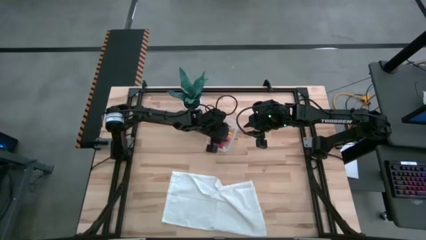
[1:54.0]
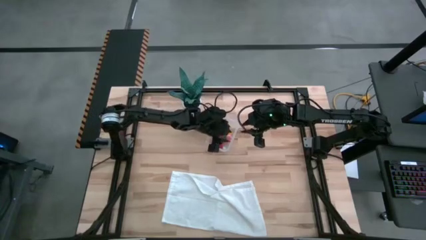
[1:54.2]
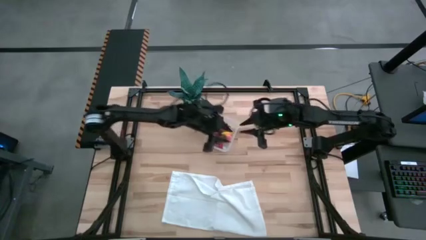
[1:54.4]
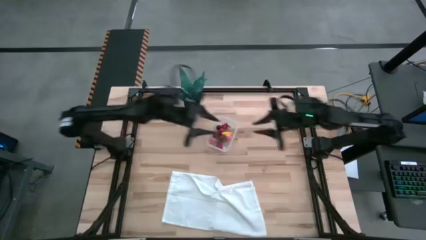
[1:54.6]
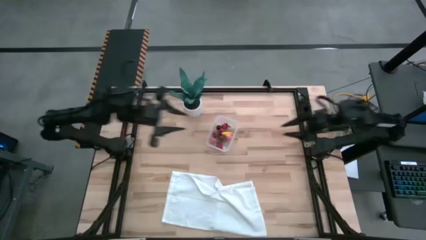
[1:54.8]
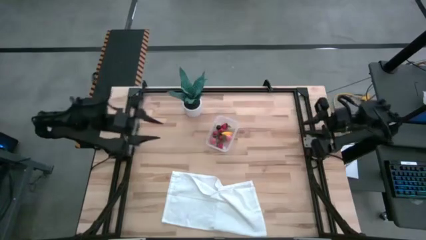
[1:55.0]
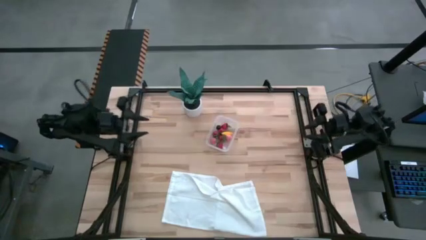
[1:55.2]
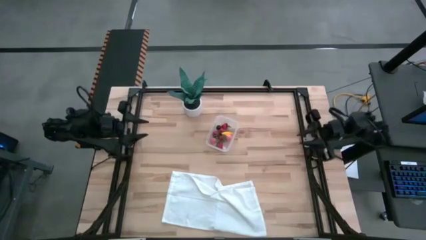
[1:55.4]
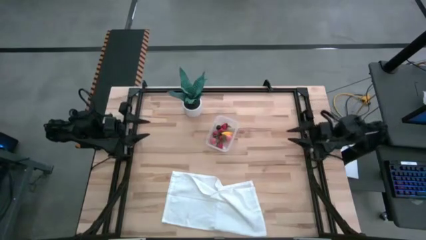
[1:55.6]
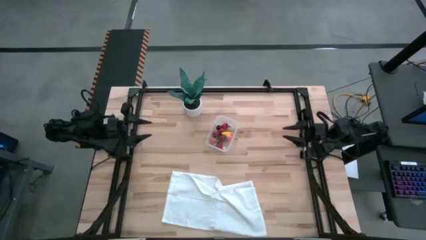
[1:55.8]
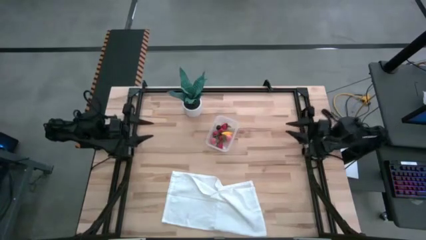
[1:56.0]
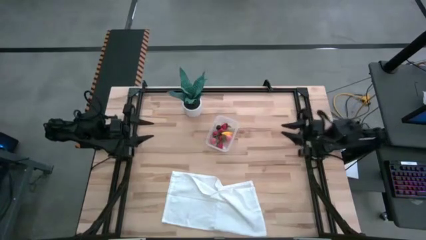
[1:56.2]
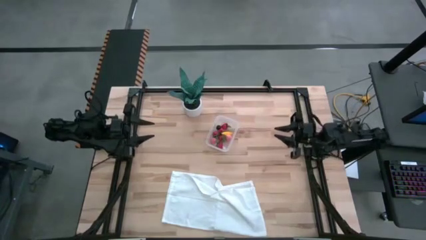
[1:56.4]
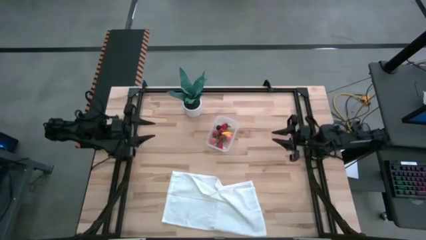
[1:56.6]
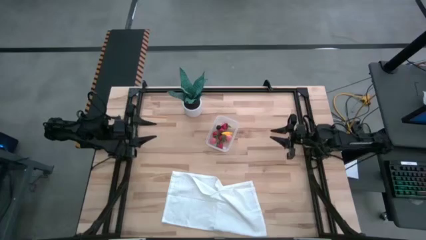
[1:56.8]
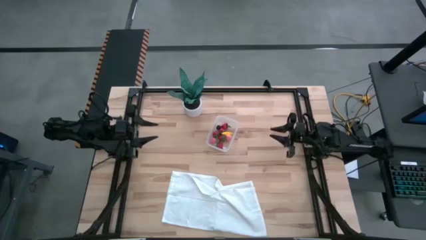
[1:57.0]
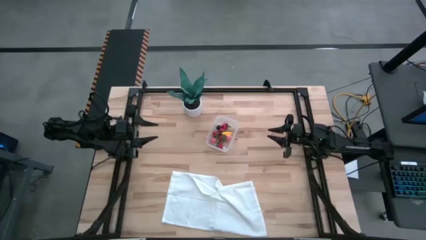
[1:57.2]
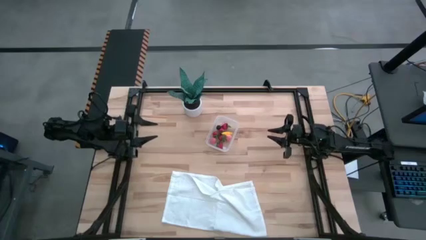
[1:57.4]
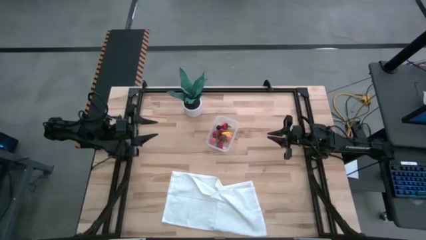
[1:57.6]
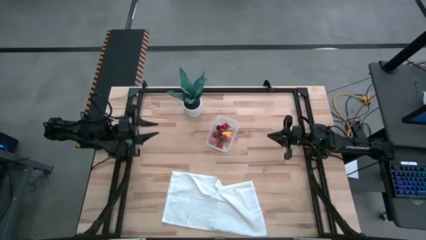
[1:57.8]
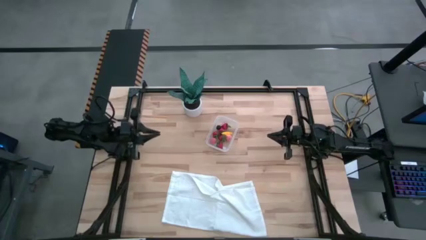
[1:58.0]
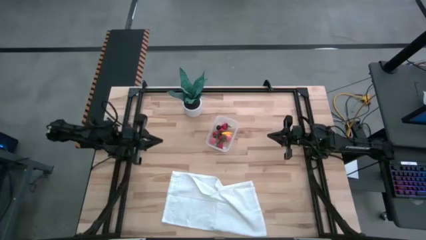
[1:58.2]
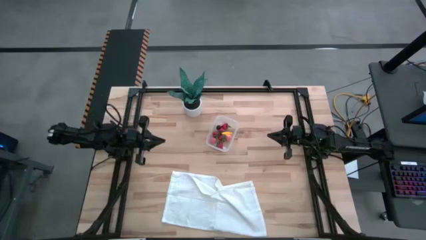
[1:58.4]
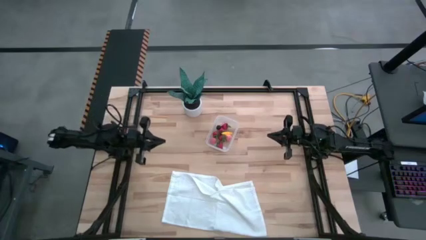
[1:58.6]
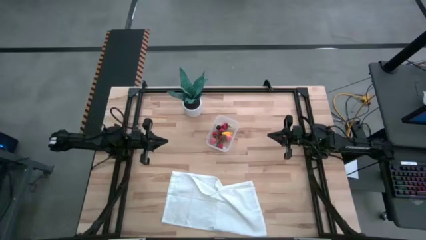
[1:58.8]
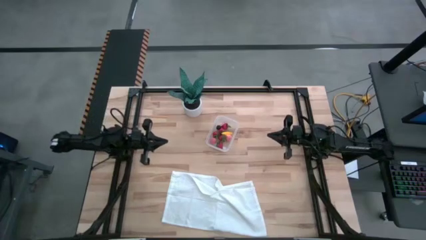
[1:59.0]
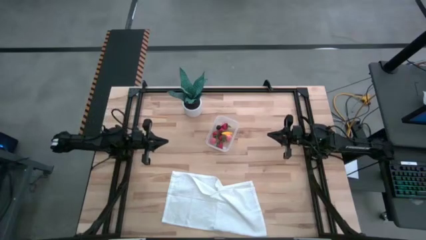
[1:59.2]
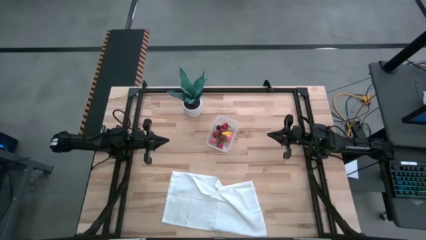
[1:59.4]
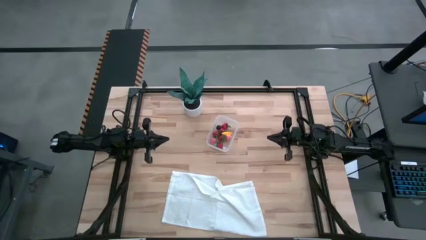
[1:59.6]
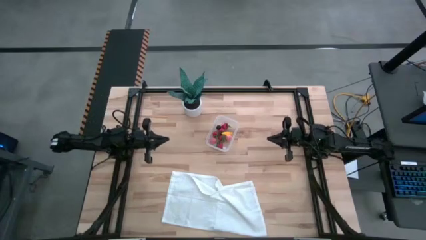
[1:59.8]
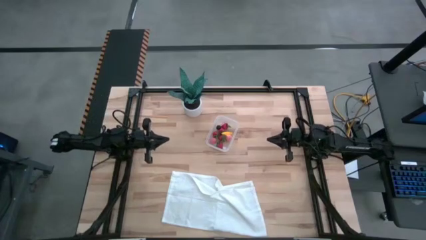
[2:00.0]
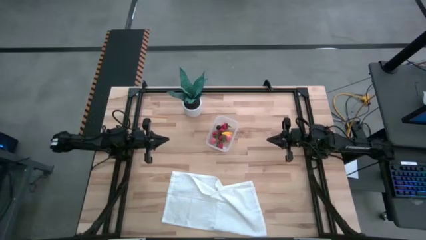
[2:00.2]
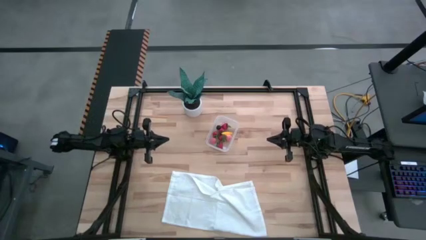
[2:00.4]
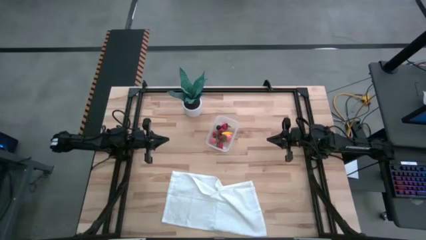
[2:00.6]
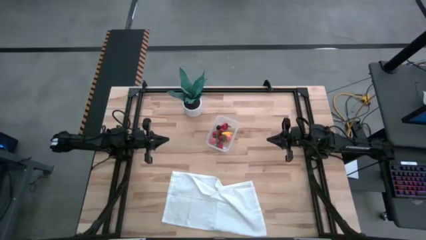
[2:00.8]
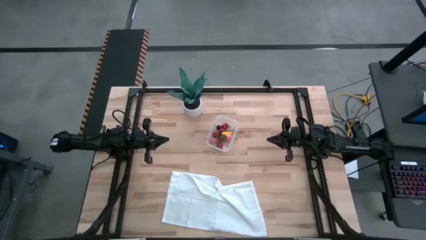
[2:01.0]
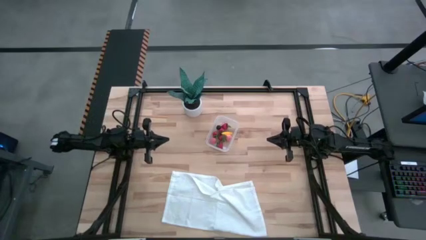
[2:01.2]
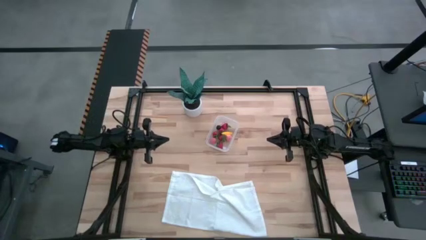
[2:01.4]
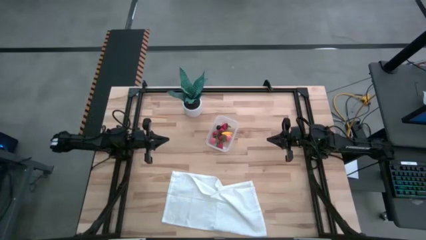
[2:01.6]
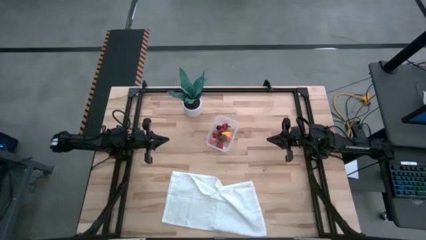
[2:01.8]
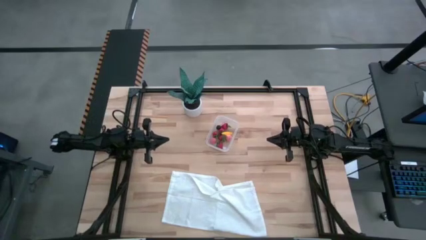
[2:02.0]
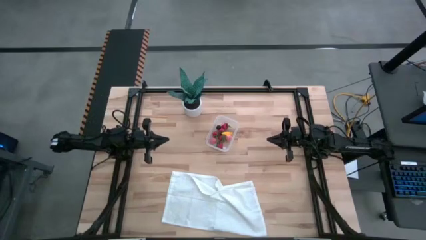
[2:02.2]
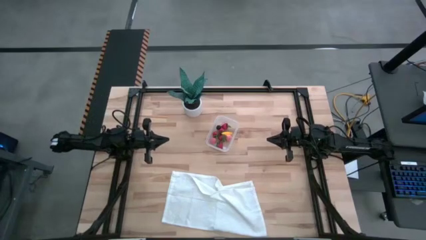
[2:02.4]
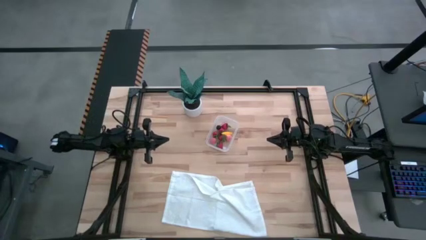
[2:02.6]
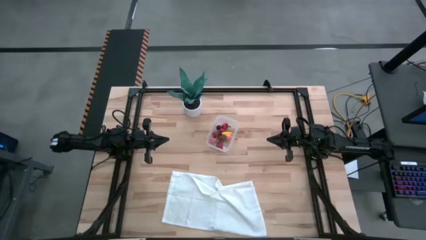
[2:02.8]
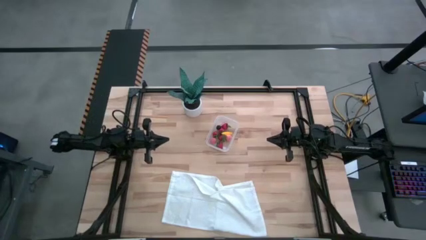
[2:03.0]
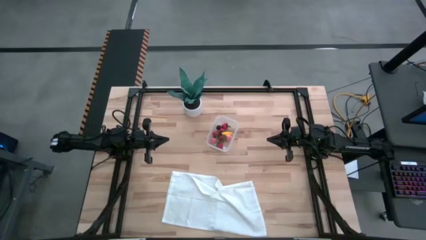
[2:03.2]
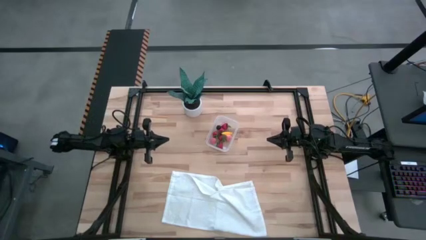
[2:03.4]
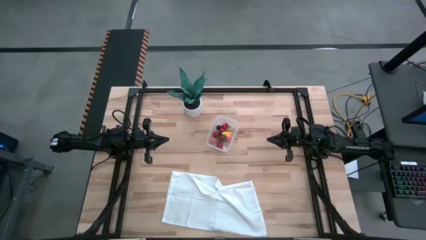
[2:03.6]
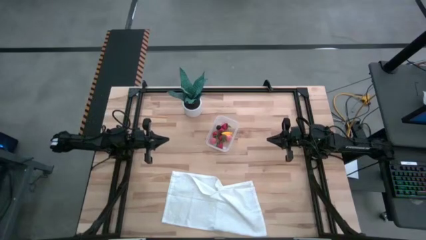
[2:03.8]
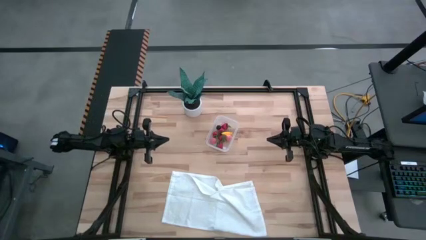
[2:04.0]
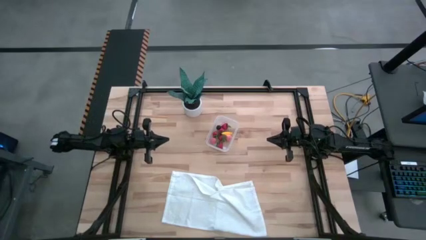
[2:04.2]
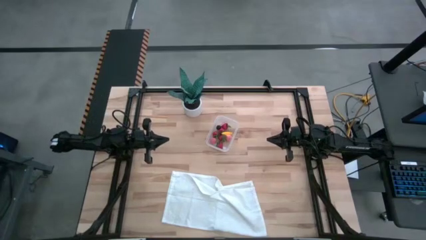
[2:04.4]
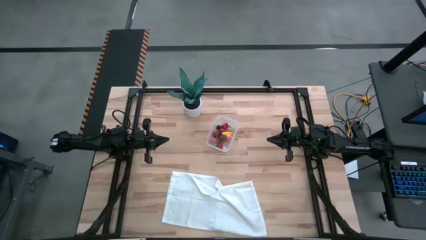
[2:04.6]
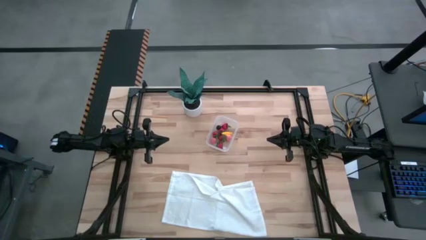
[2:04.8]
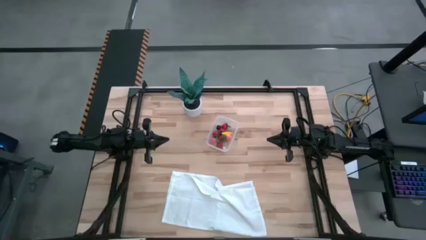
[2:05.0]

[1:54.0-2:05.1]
Task: Pick and placing Produce into tupperware
Return to Home Position

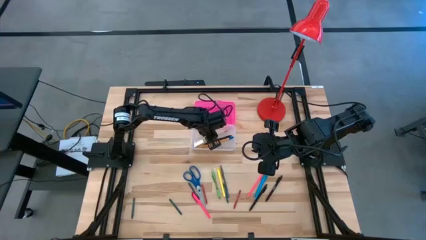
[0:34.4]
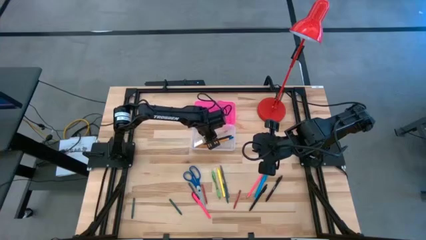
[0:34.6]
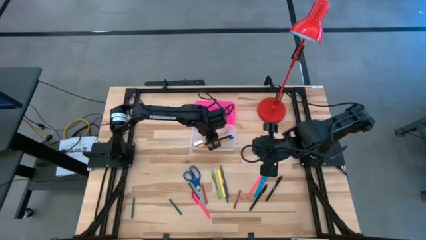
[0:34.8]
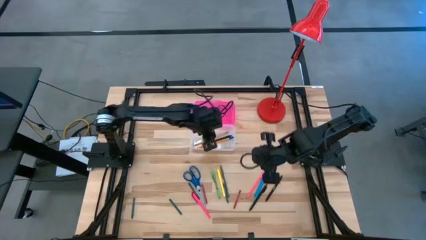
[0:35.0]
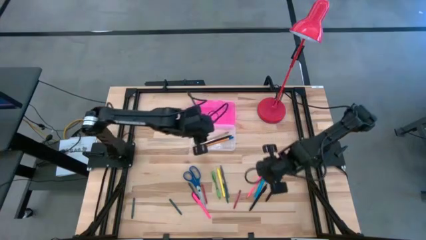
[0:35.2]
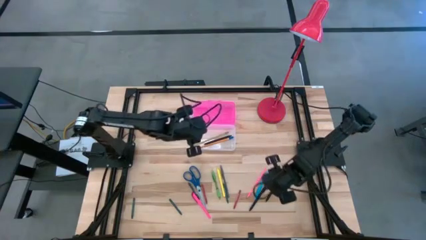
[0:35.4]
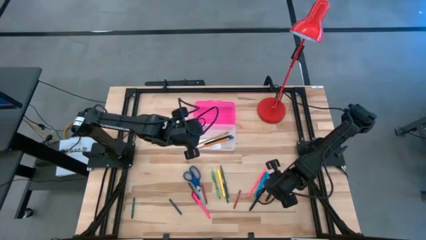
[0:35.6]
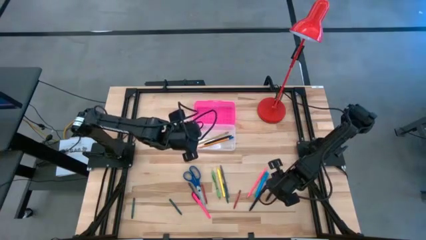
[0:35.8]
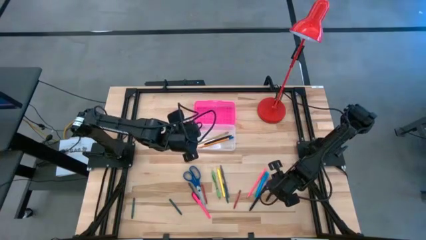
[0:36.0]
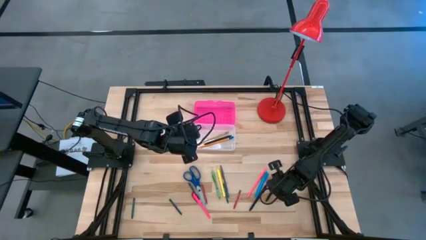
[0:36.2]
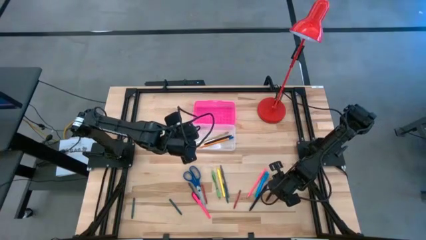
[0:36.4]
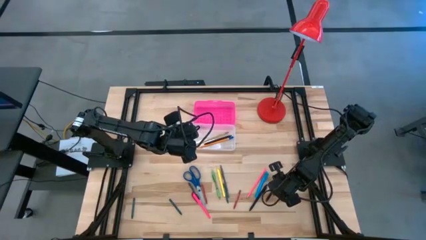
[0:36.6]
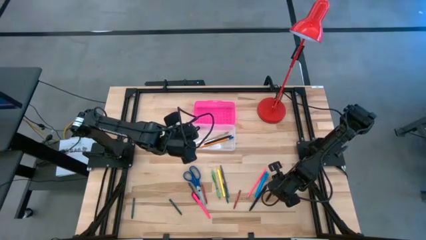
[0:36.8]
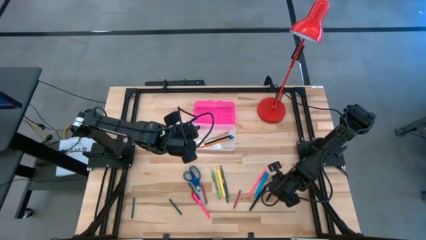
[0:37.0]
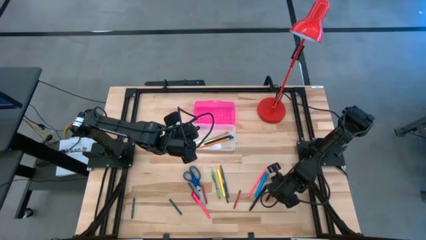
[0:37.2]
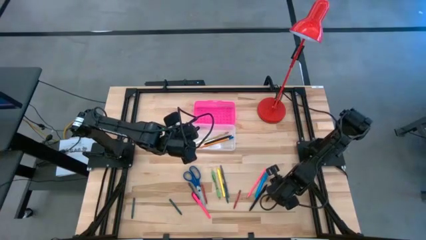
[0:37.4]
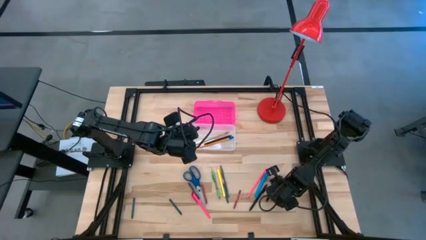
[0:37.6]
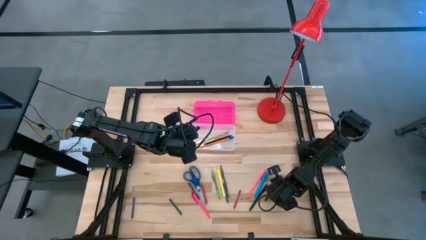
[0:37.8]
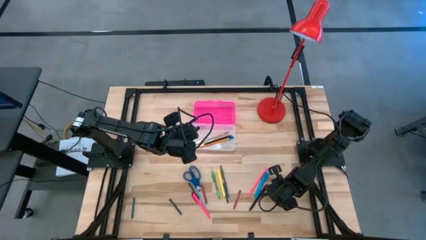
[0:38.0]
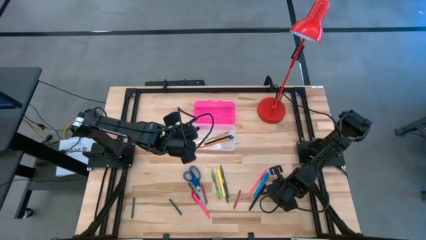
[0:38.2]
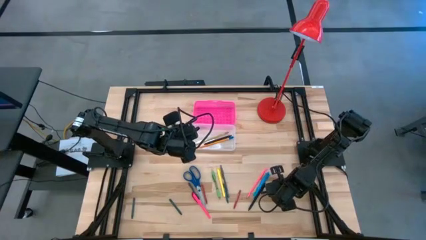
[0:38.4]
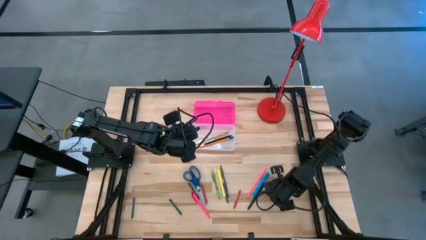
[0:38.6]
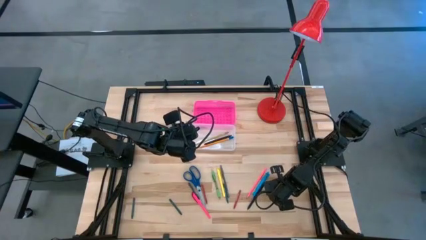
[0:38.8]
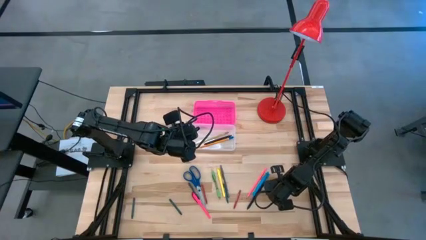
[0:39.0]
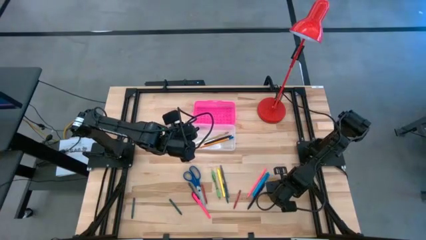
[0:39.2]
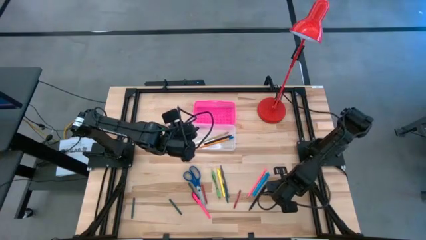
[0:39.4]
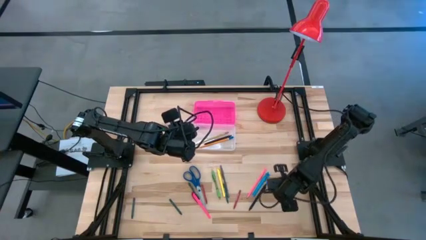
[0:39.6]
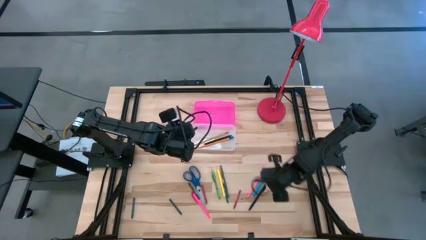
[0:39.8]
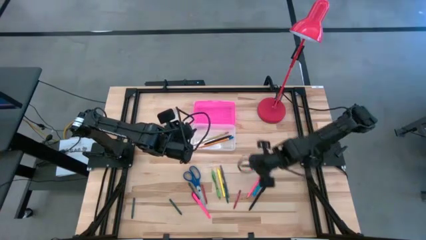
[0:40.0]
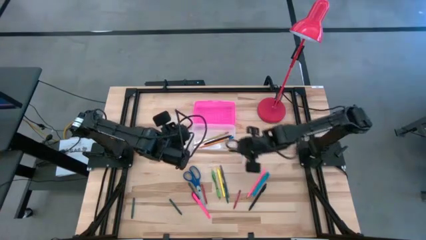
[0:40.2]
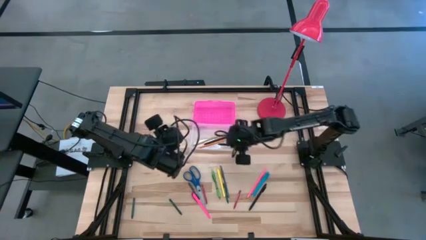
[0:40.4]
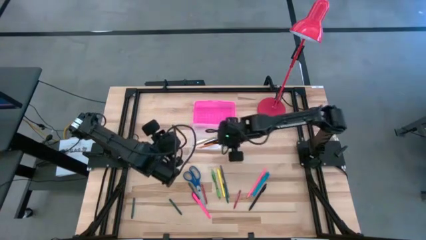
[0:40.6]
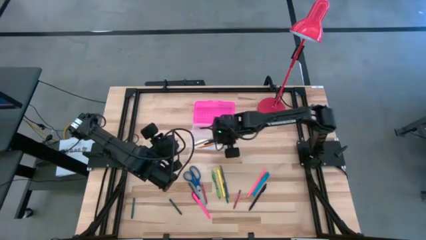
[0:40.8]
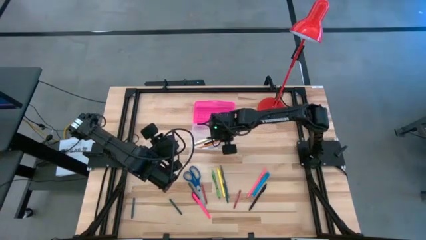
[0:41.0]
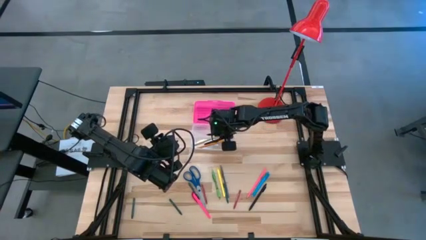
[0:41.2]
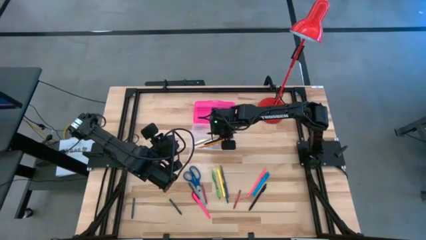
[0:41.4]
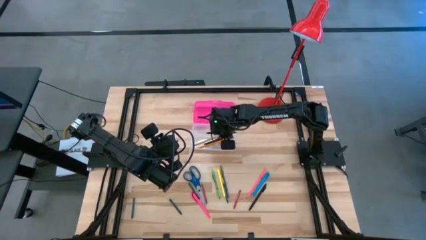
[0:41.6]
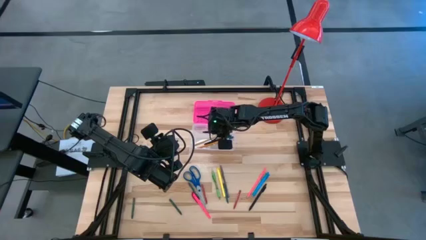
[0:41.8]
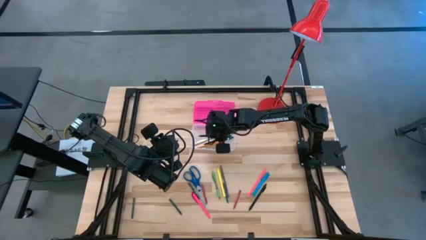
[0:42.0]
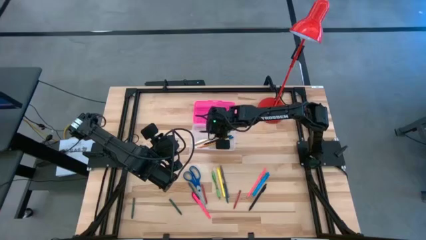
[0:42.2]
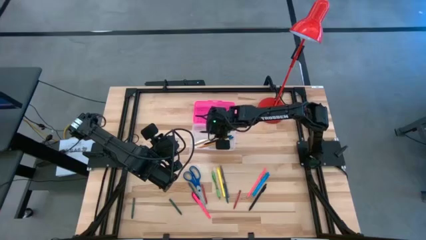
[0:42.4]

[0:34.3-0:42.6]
Task: Pick & place school supplies into a supply box
Put the black pen into the pink supply box
